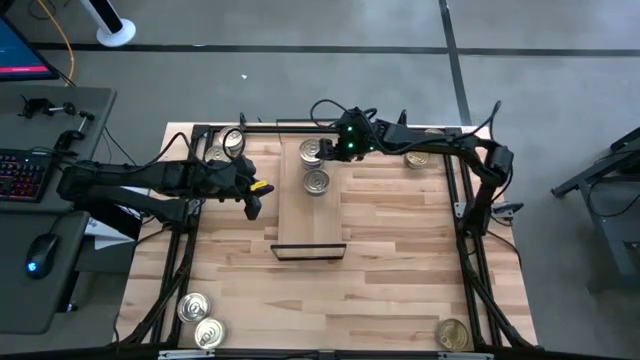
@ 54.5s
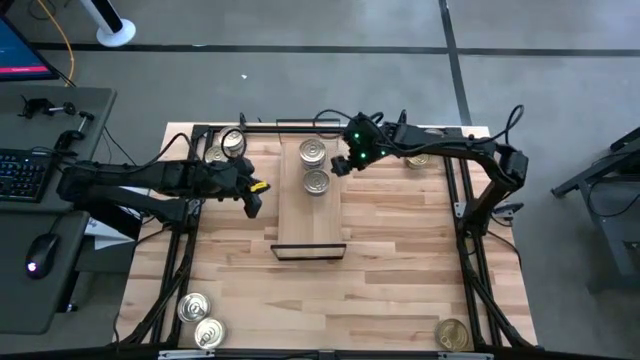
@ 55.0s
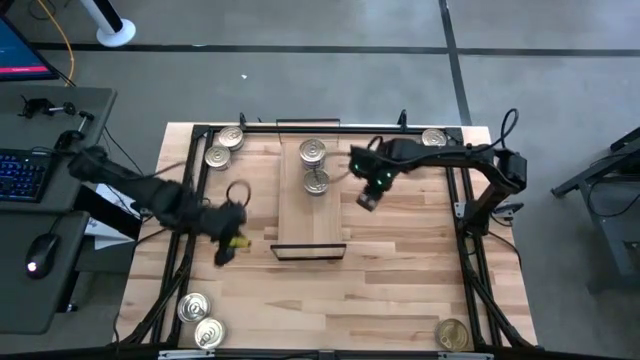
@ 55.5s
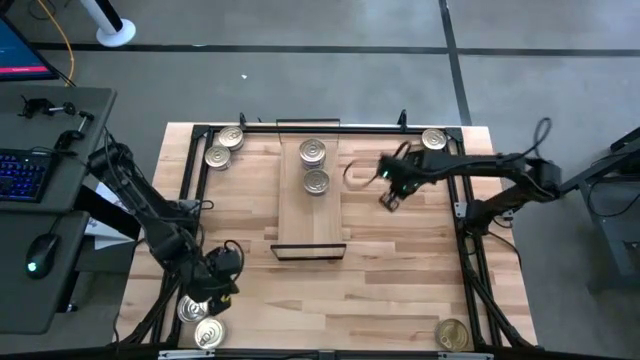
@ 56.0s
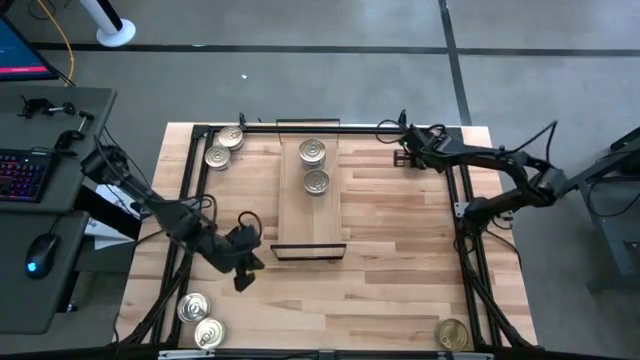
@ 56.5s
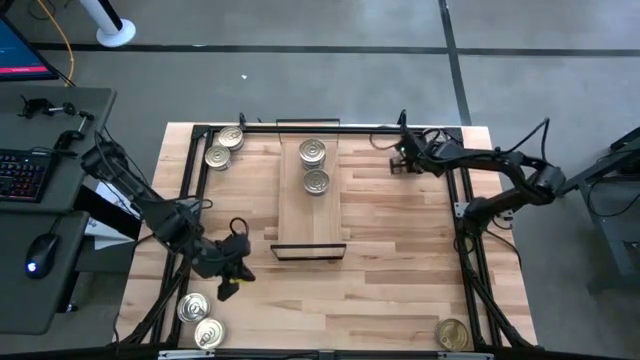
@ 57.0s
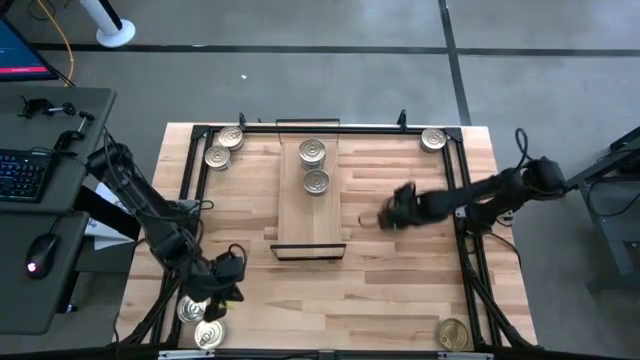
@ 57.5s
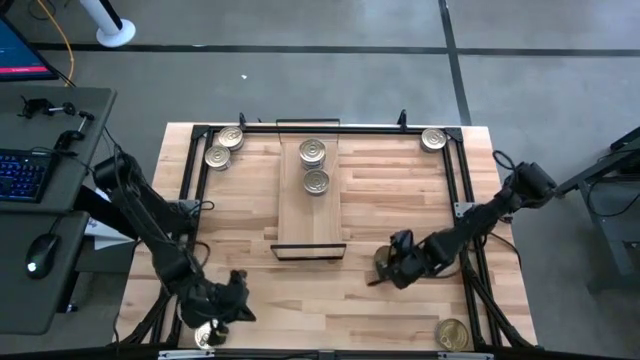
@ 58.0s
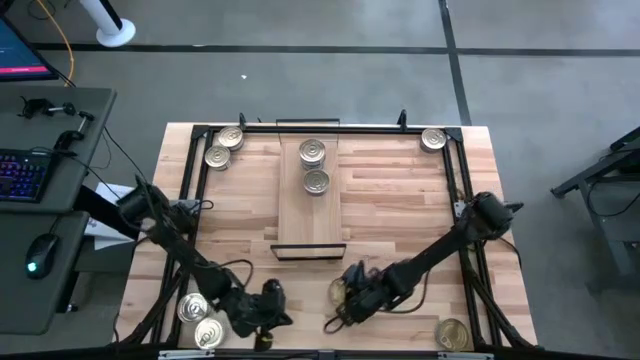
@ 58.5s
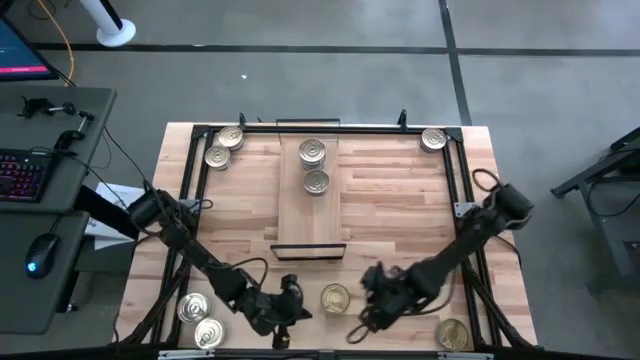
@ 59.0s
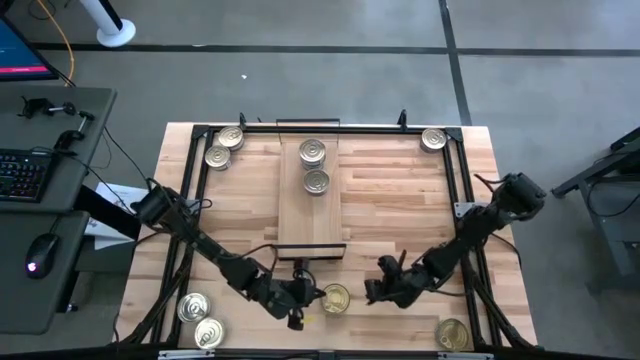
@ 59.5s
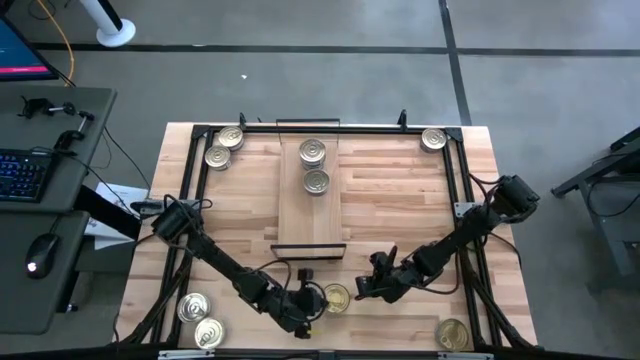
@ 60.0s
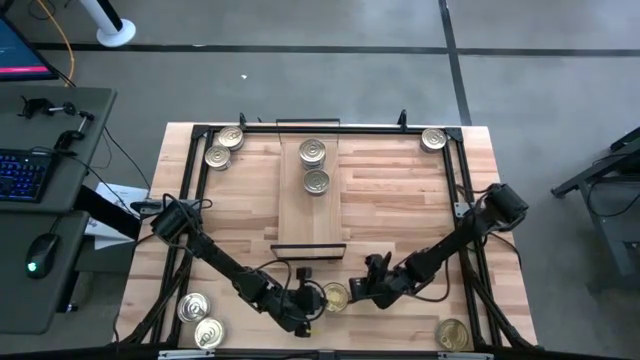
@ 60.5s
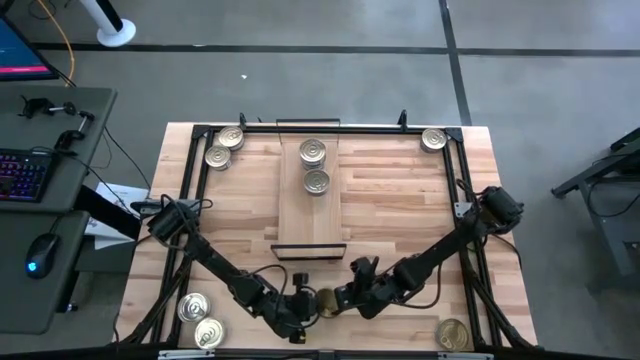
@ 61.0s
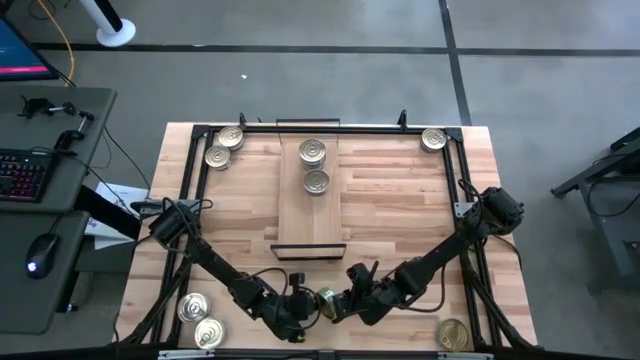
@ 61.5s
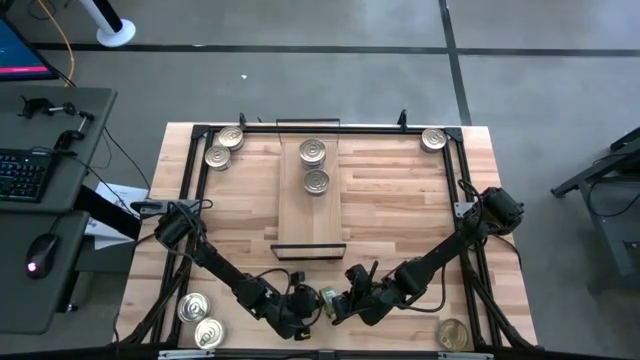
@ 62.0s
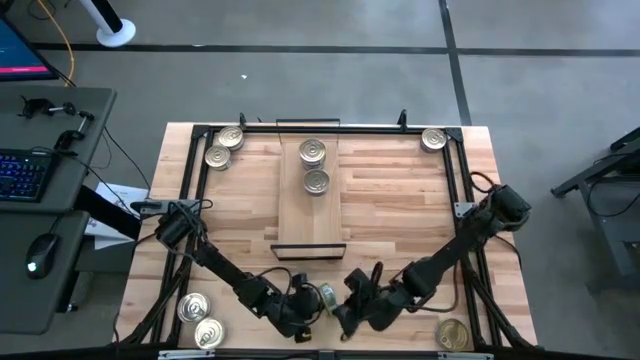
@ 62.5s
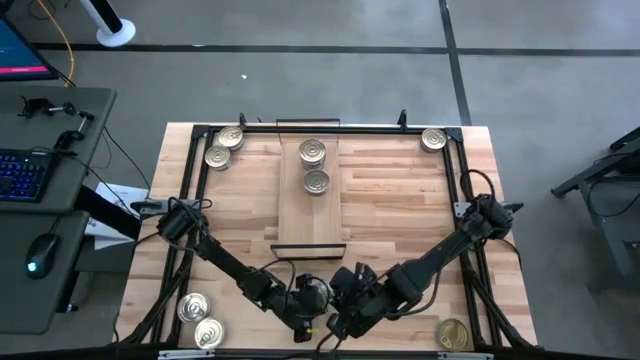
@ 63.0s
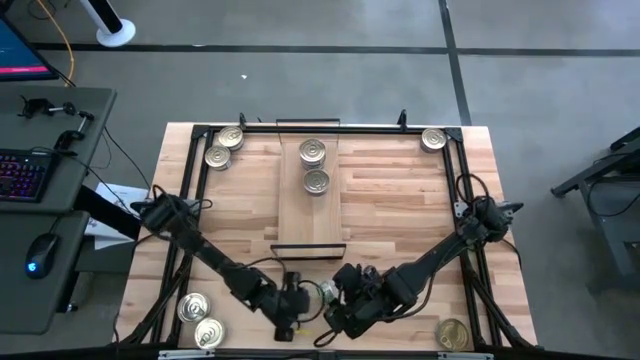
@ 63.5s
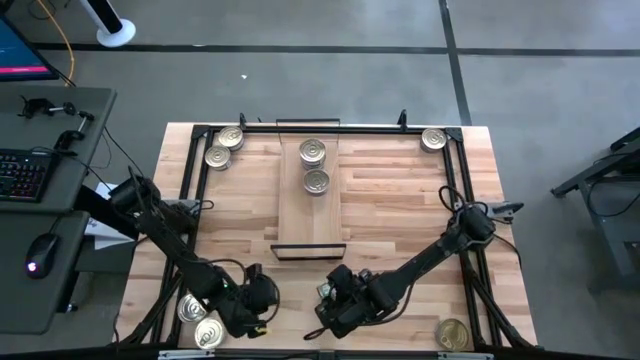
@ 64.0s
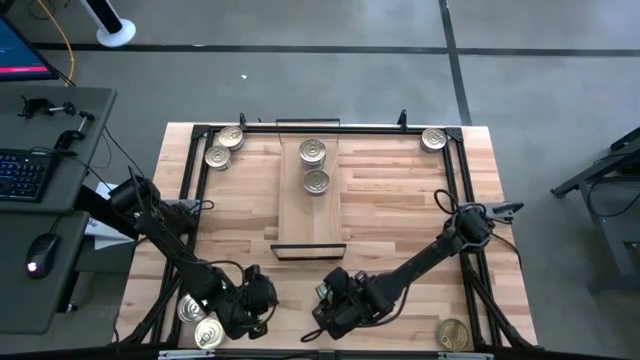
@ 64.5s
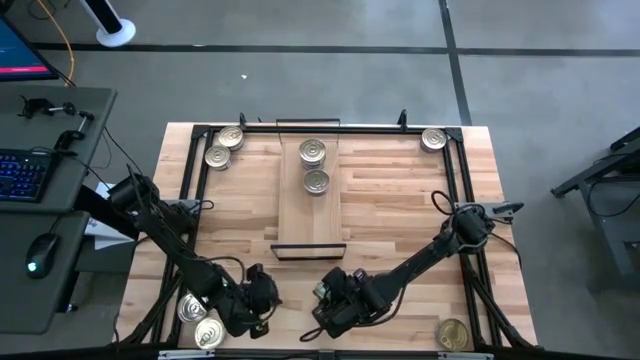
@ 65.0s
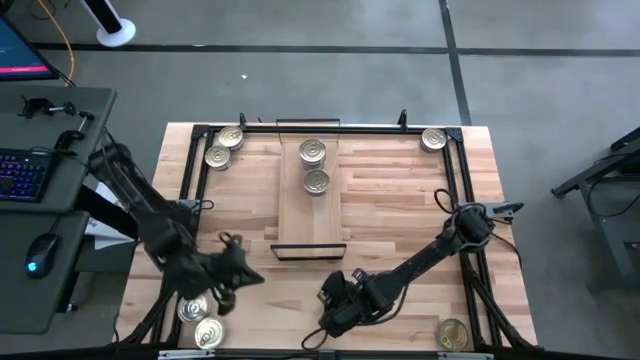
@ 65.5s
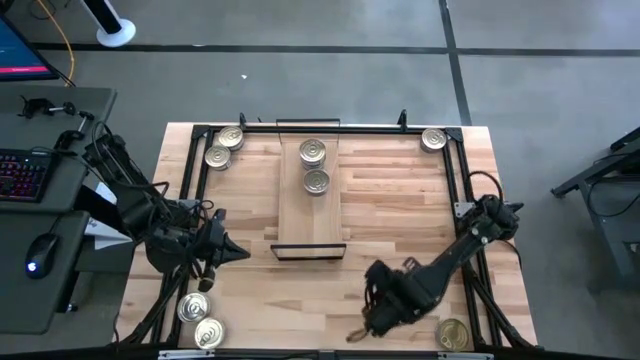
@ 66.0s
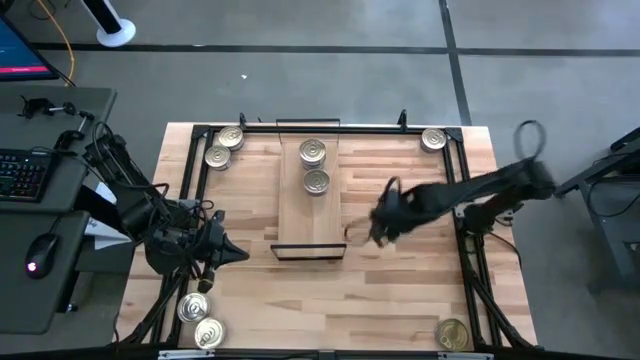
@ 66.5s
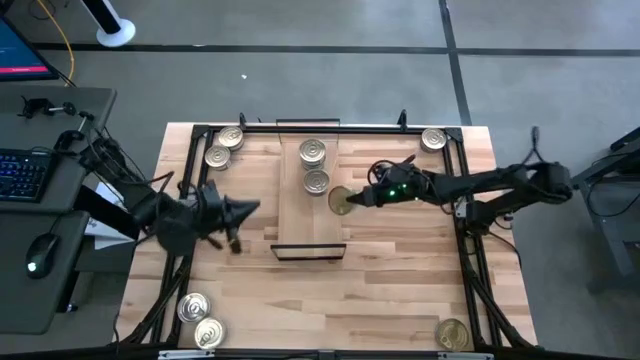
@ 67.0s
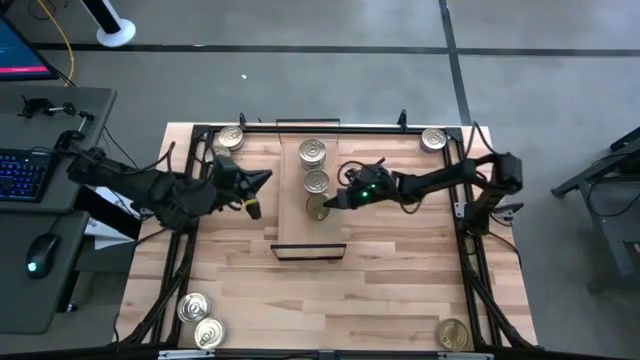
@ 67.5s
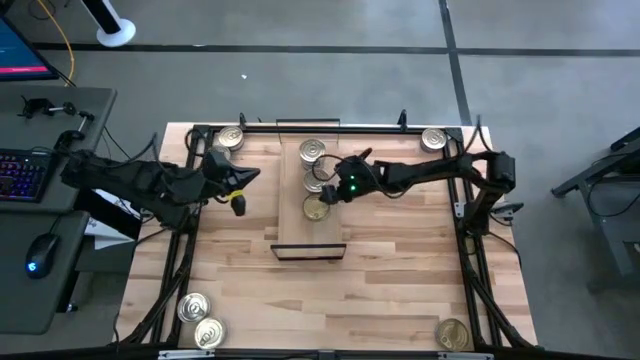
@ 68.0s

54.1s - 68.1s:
Task: Stack canned seafood by type on shelf
Put the green tuna can on the shelf

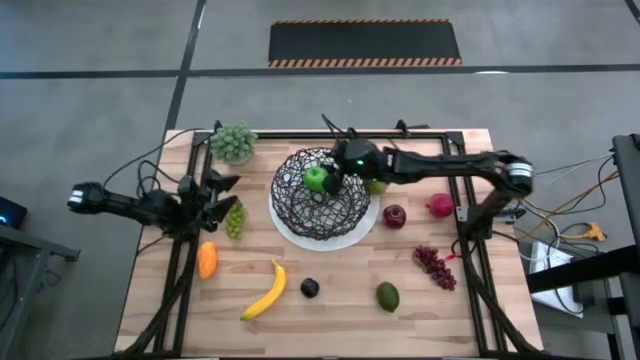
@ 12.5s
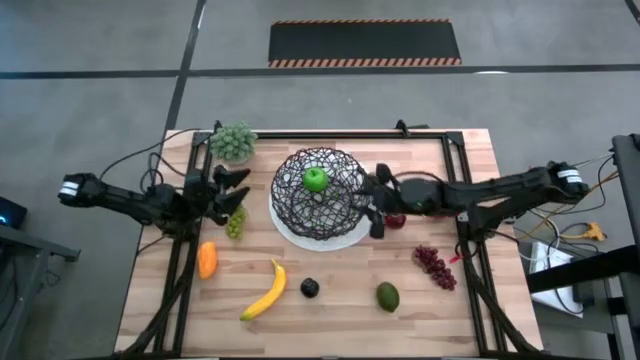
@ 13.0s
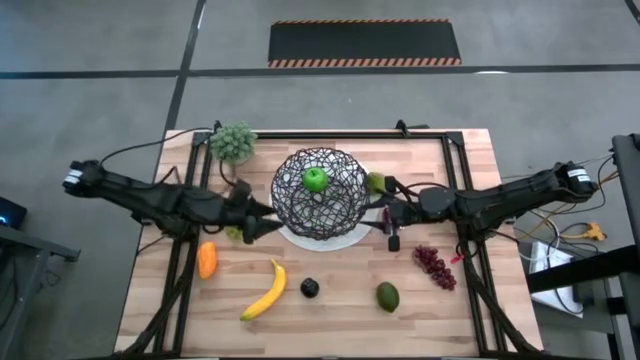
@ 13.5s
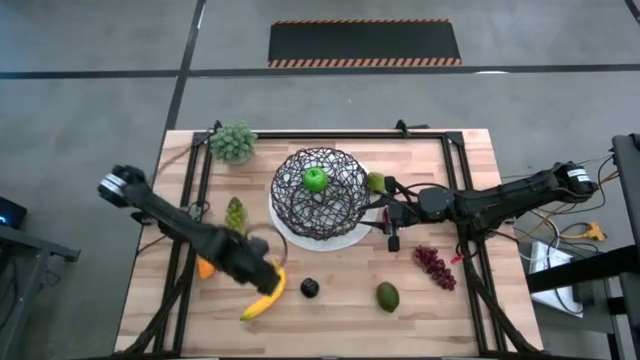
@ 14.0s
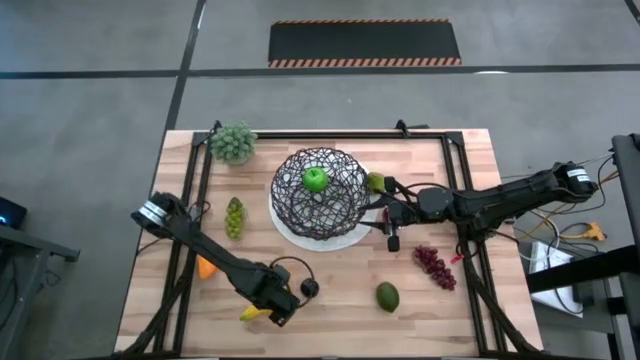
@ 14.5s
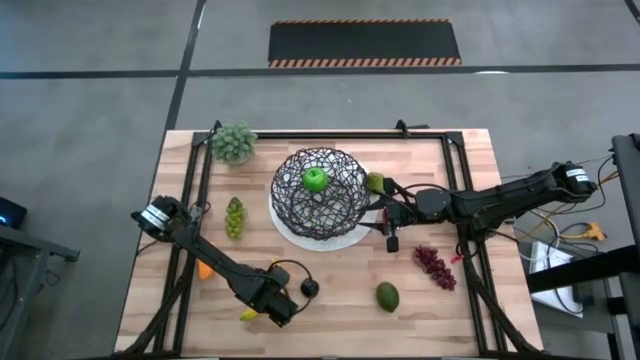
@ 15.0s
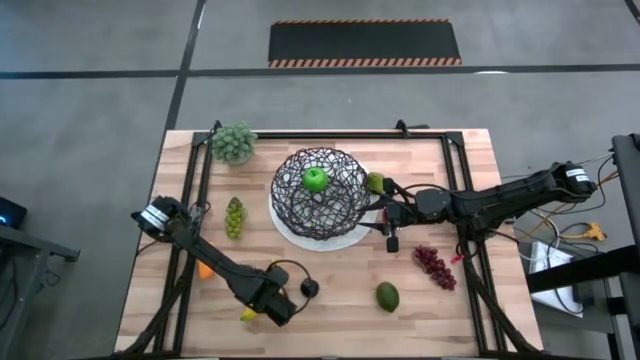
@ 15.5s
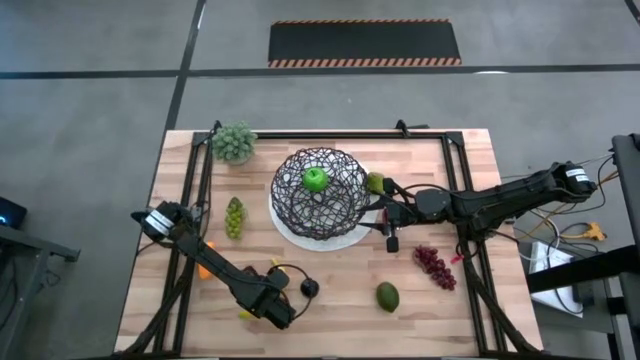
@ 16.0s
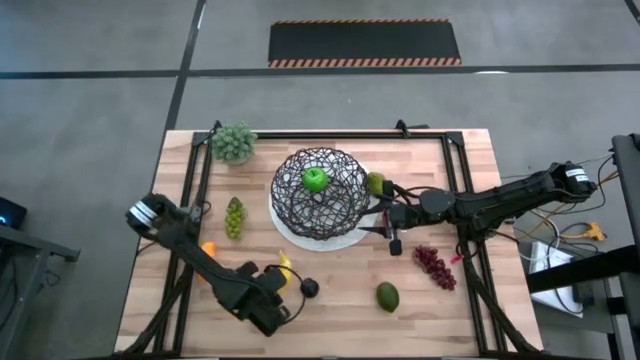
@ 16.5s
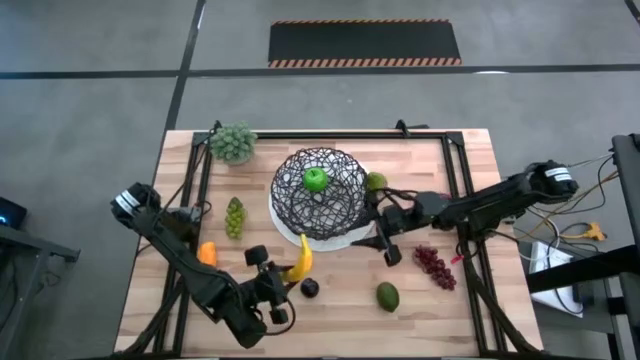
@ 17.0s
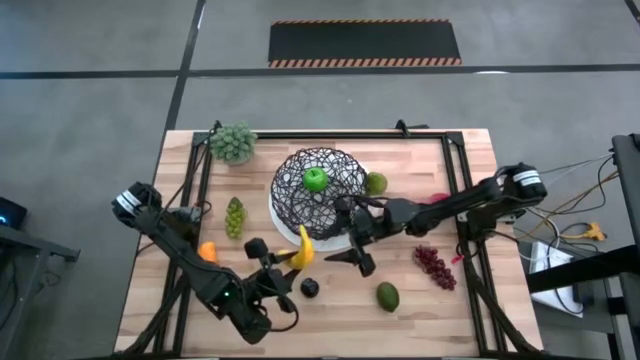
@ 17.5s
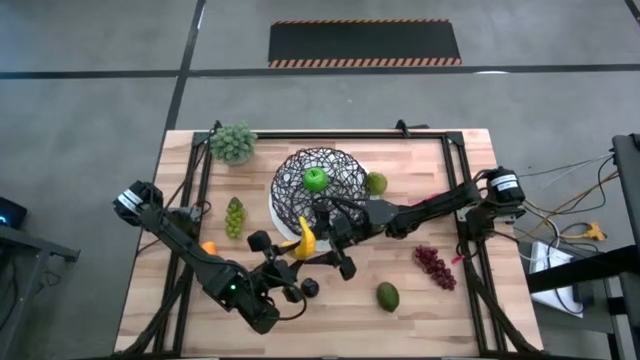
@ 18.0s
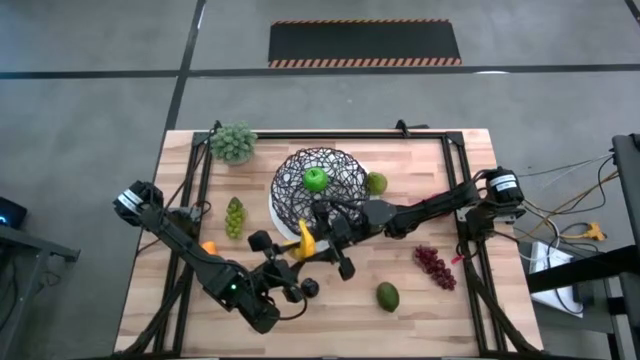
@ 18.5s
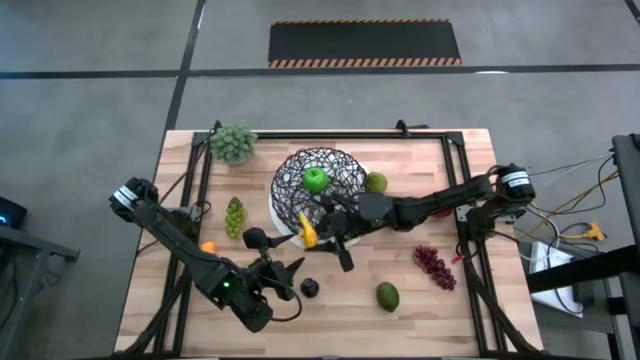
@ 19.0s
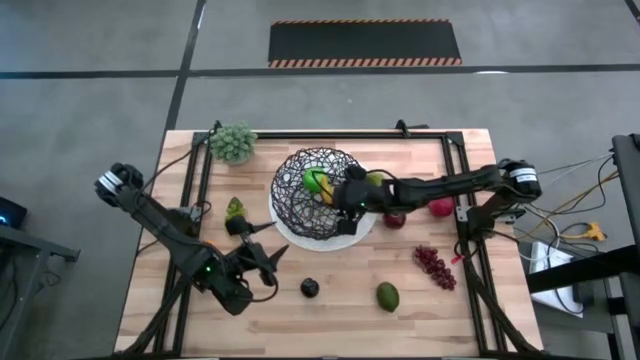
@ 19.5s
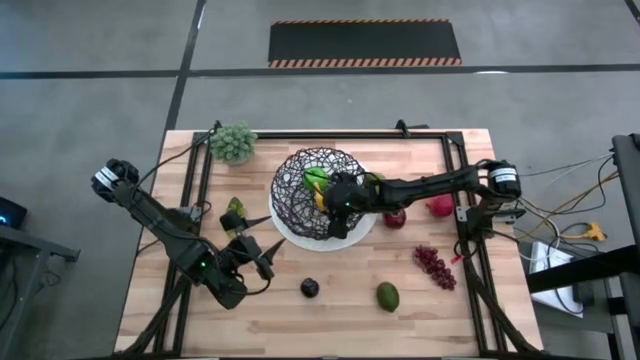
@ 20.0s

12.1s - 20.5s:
Task: Build produce basket
Put the banana into the wire basket
